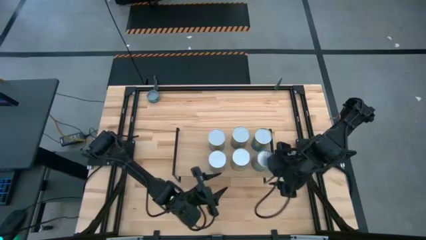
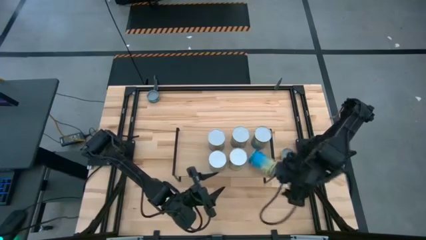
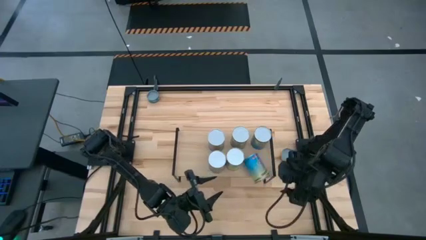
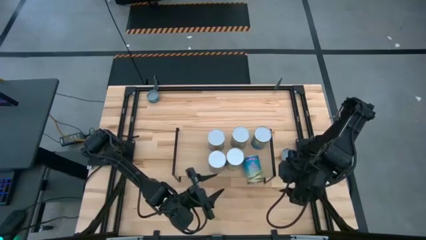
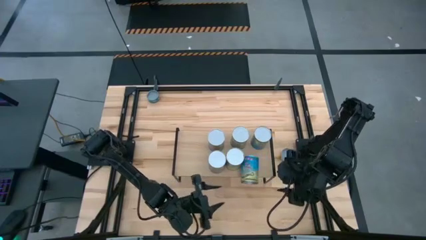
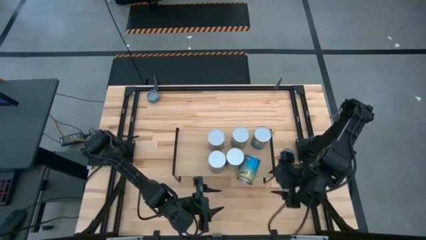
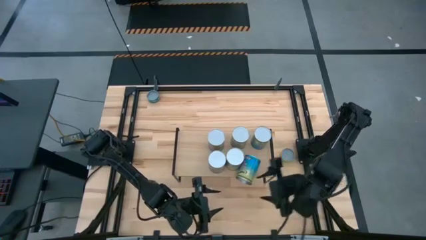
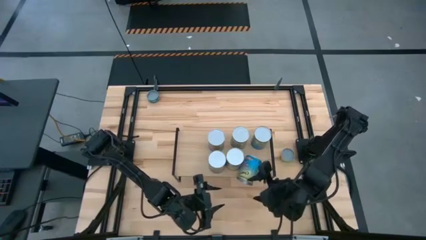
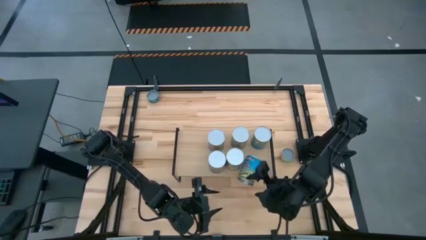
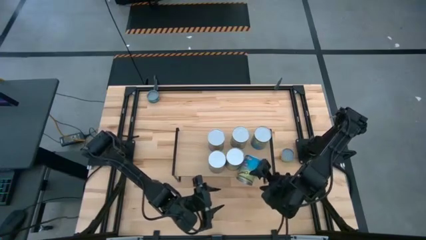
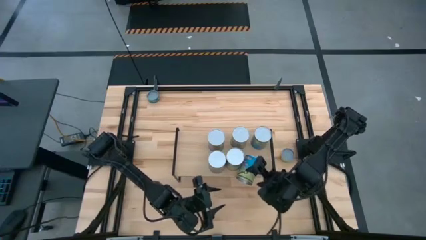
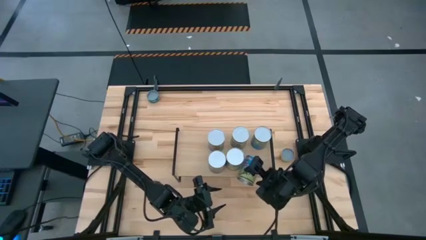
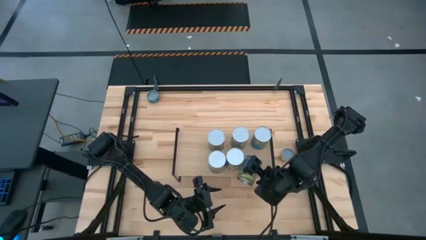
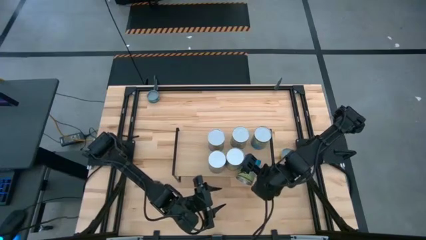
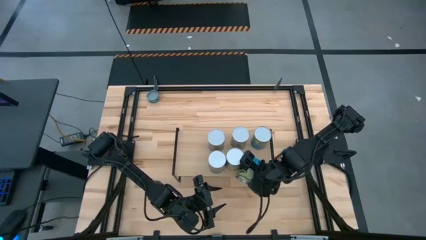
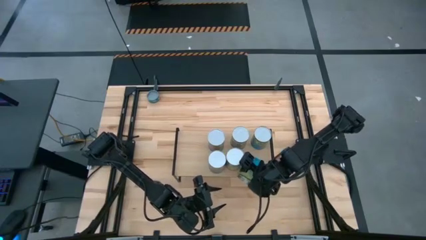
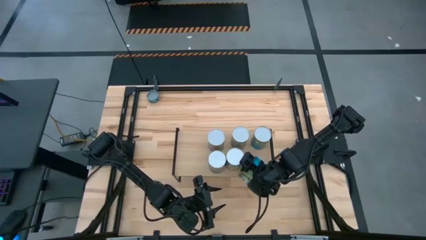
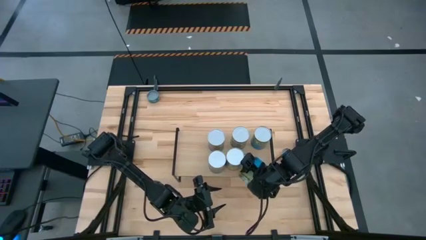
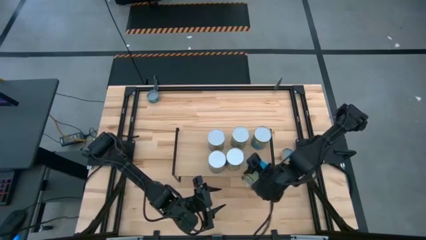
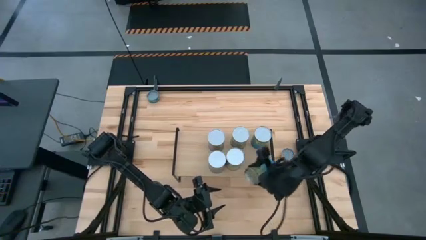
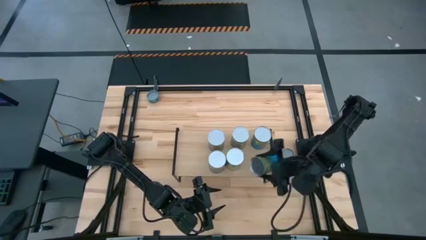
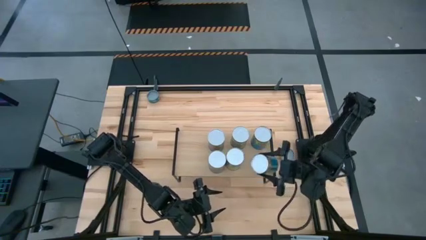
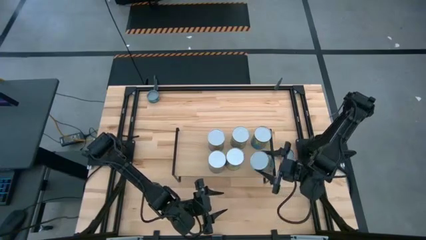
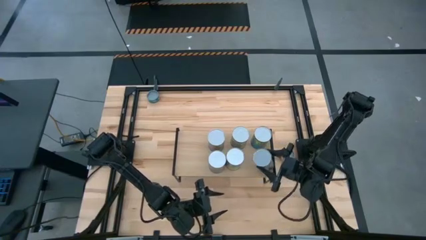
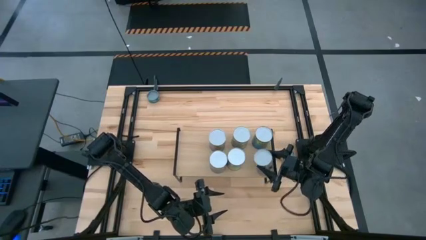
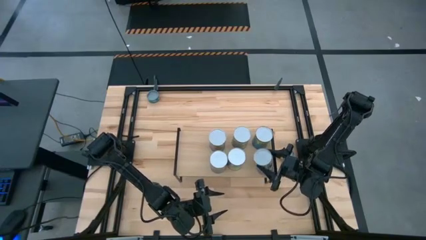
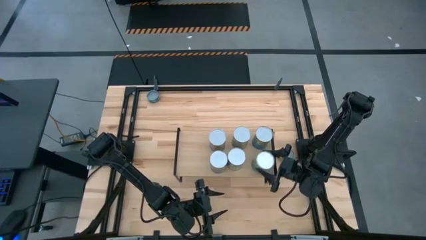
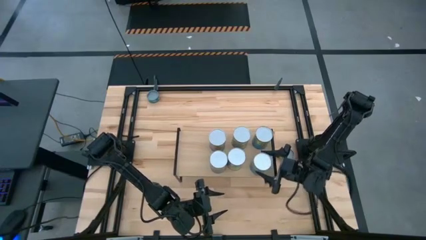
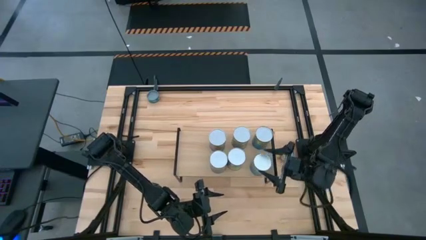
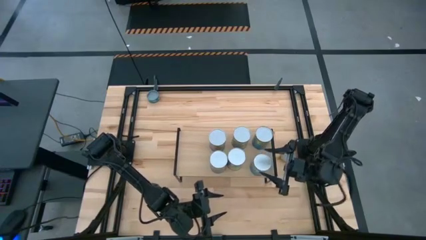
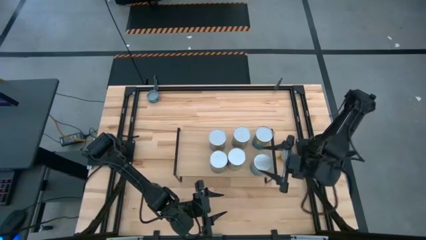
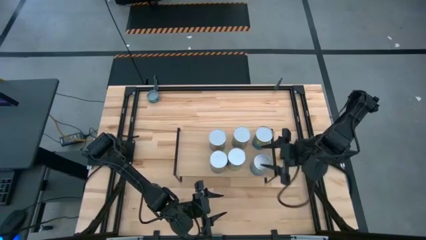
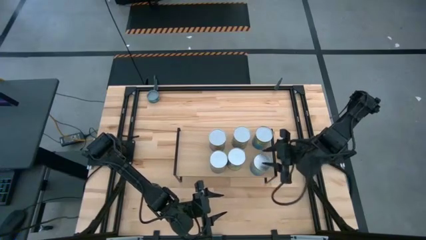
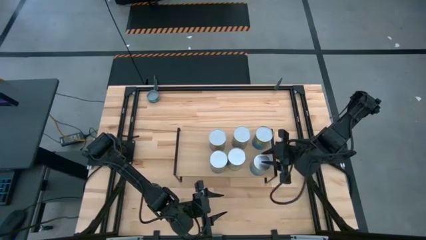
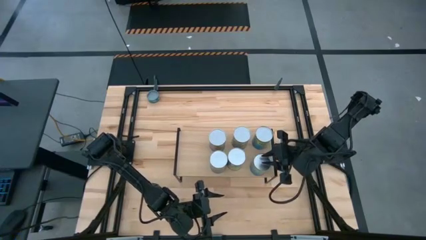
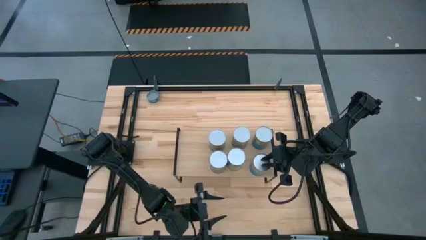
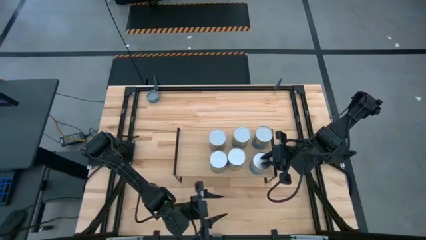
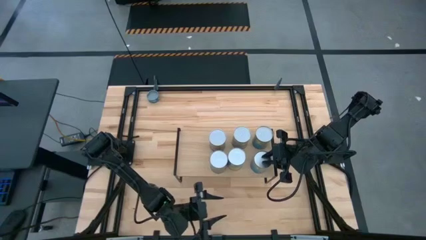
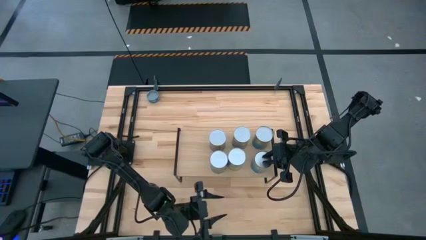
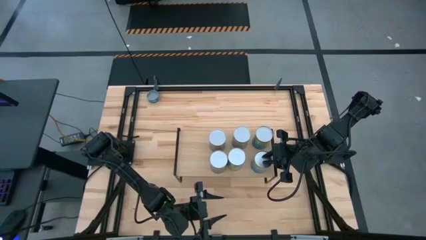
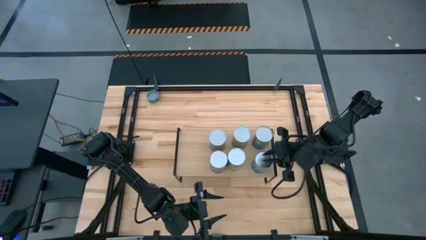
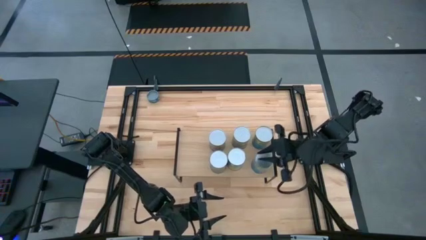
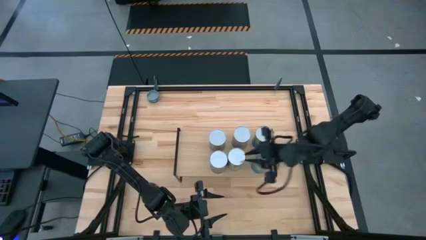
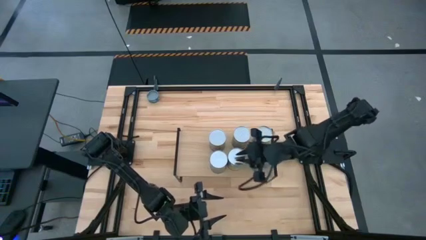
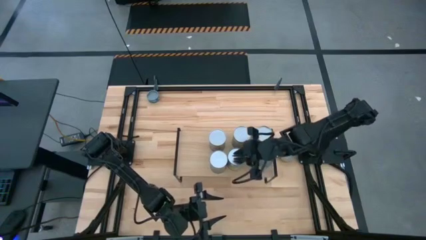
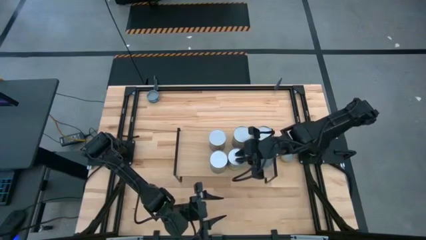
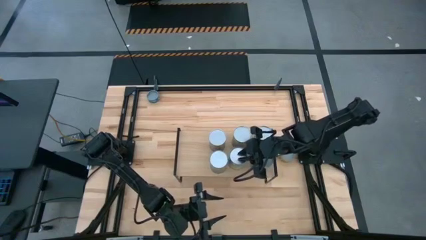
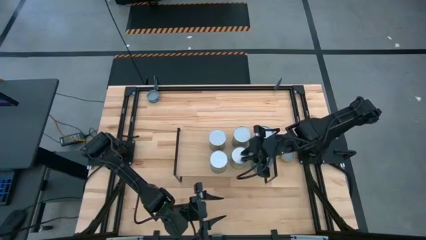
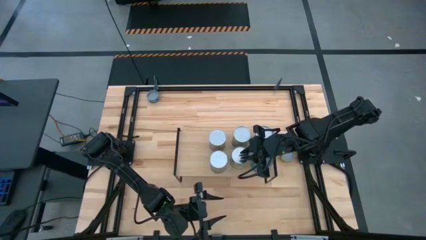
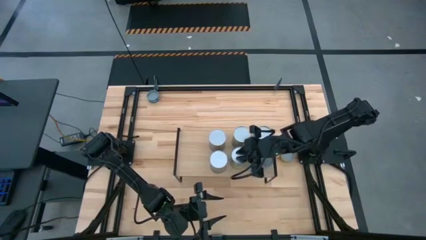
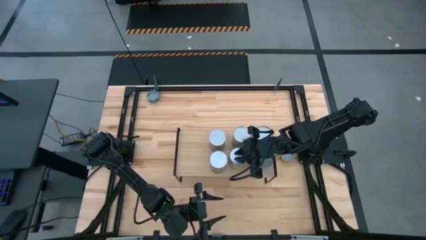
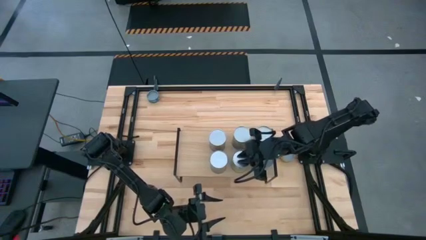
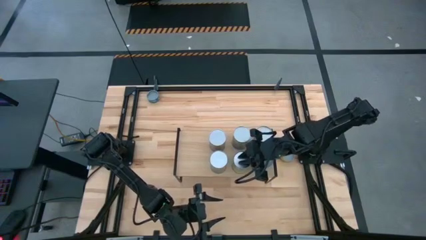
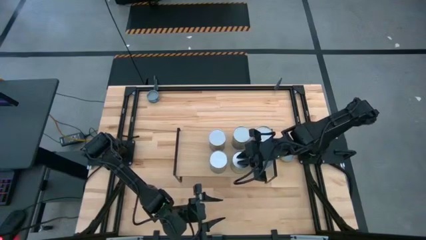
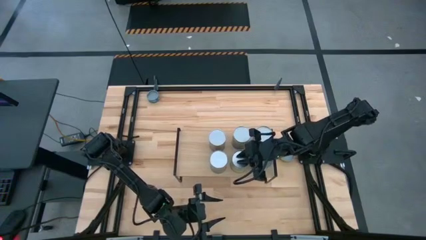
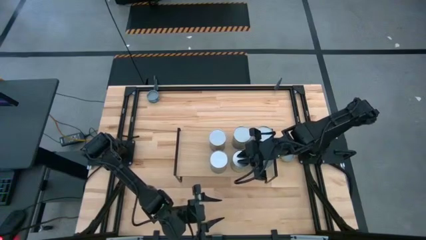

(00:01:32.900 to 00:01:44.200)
Task: Pick and place cans onto a shelf
Adjust the canned goods on the shelf

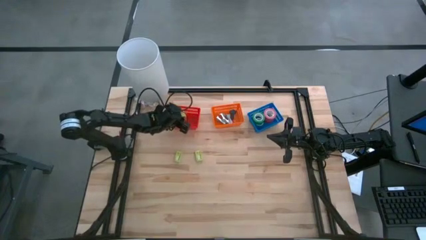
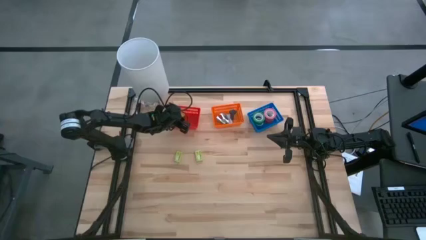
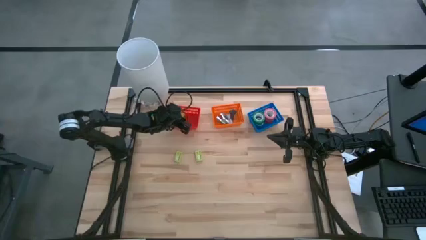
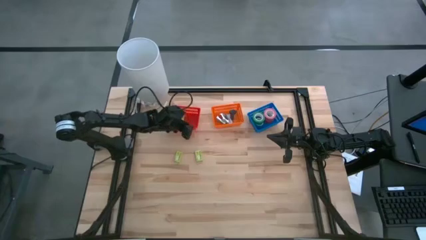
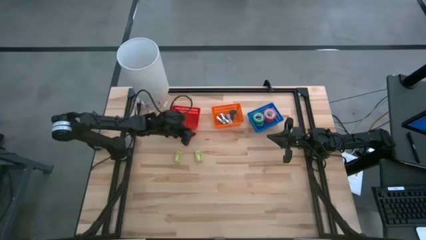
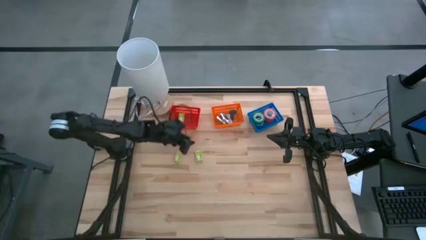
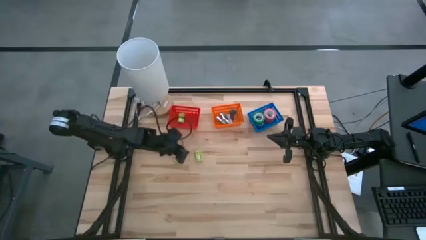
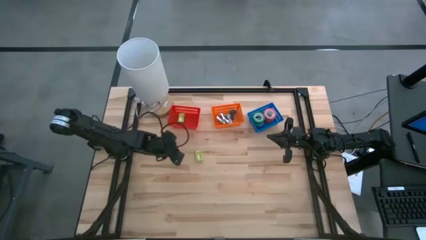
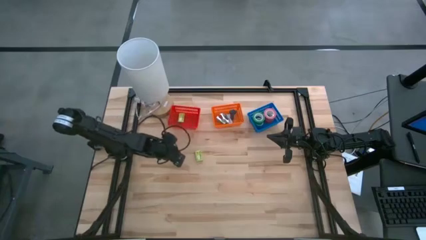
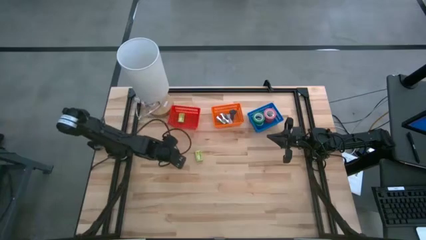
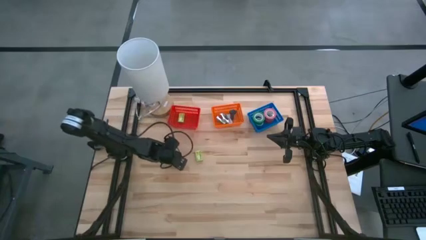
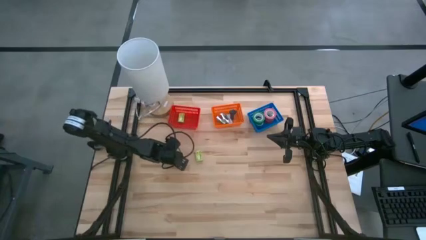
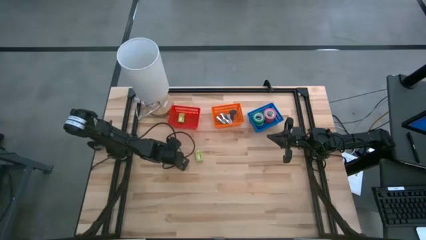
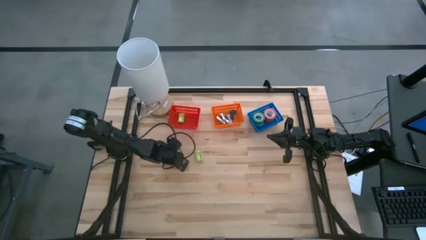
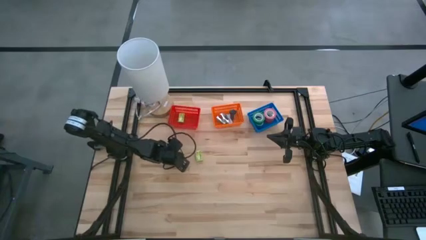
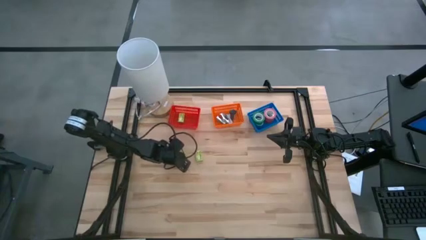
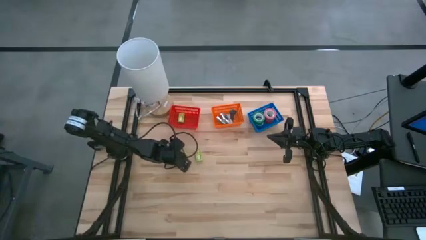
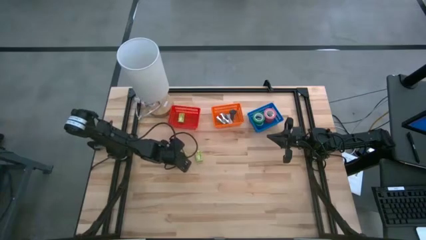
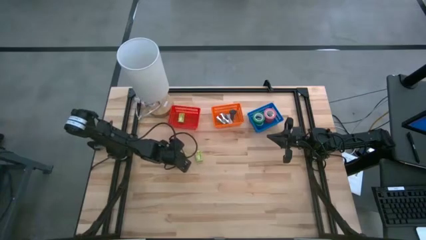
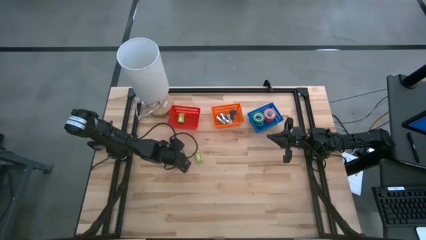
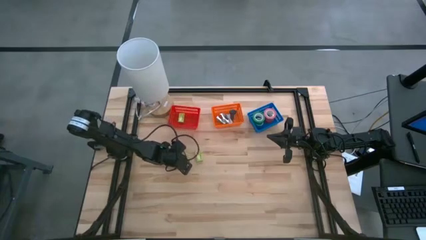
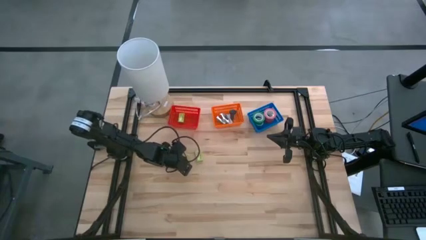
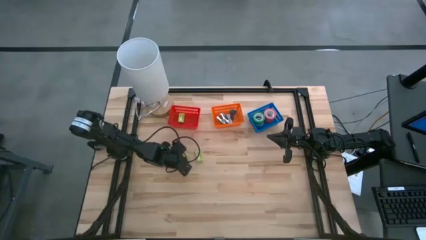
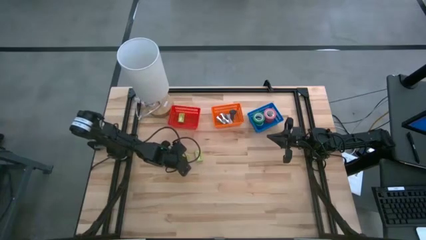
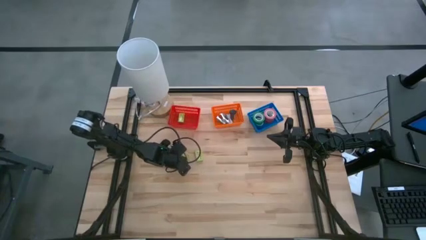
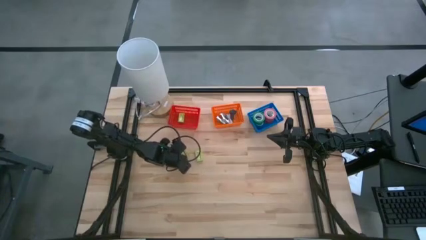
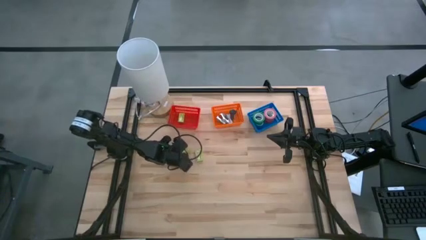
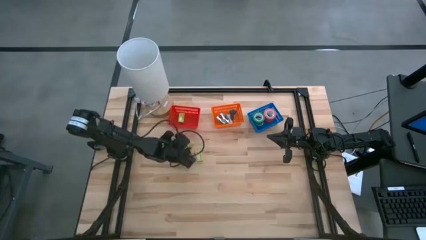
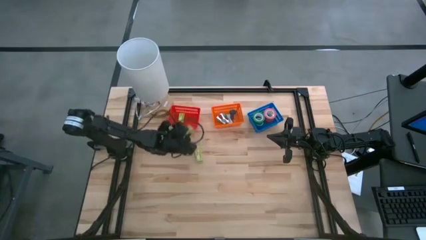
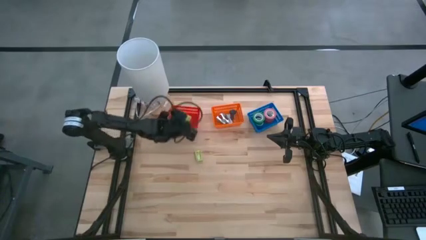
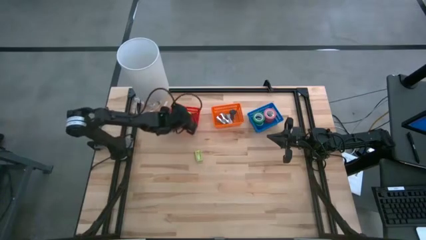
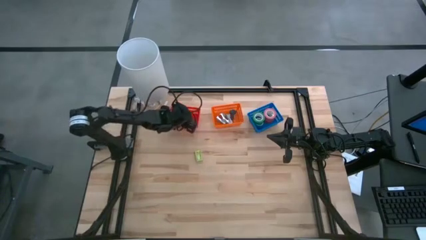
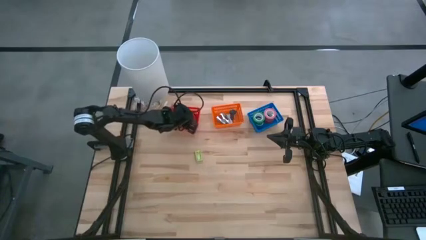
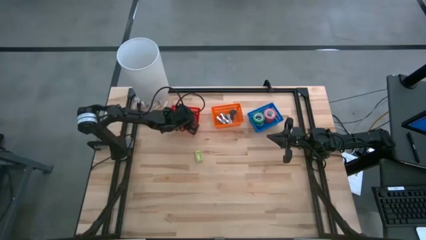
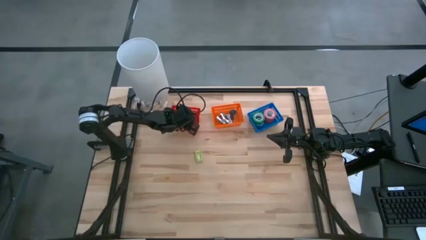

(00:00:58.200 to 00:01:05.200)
Task: Pick and place Stapler, Stapler remover, tape
Put the left green staple box into the red bin
